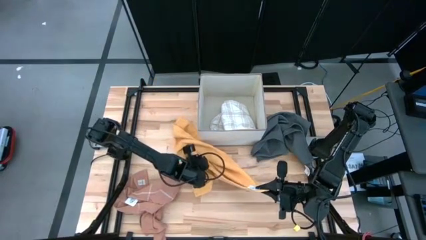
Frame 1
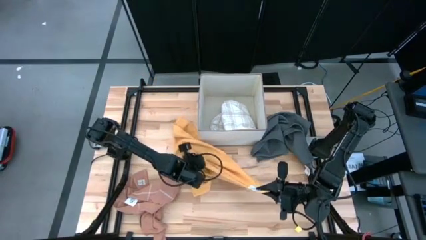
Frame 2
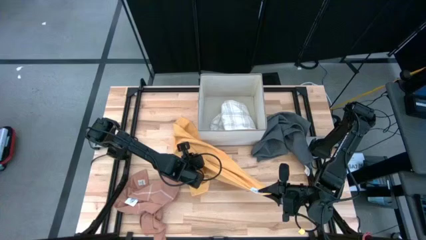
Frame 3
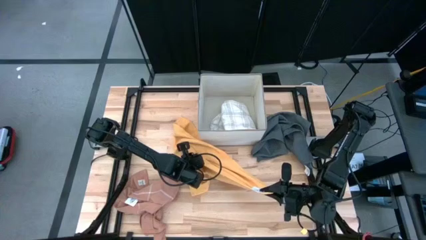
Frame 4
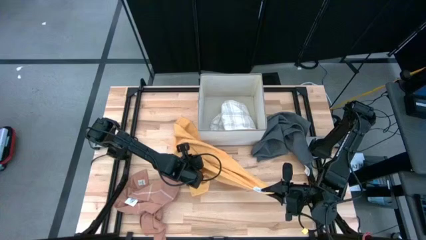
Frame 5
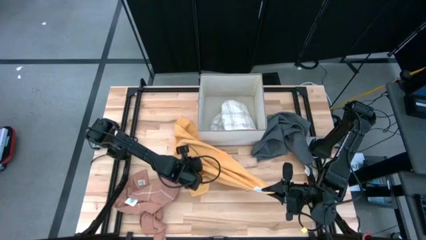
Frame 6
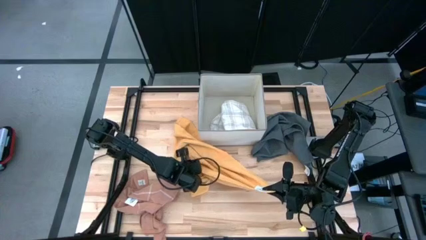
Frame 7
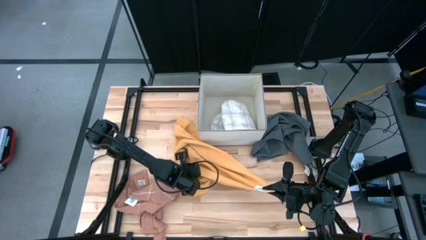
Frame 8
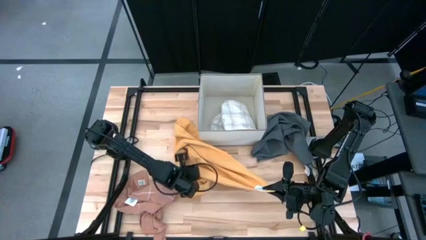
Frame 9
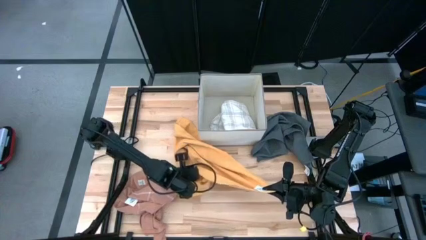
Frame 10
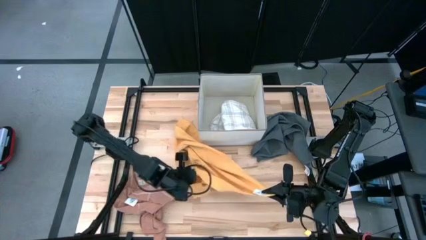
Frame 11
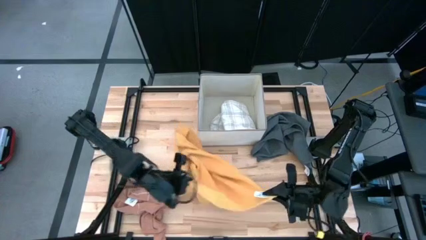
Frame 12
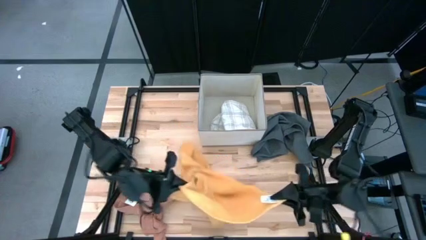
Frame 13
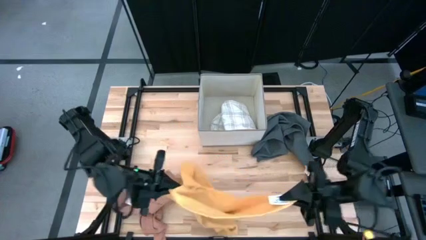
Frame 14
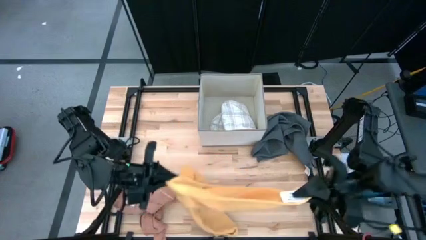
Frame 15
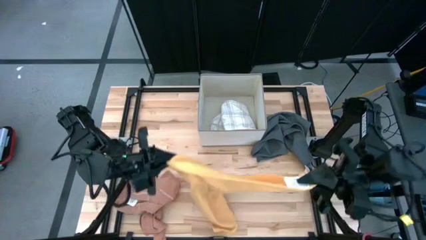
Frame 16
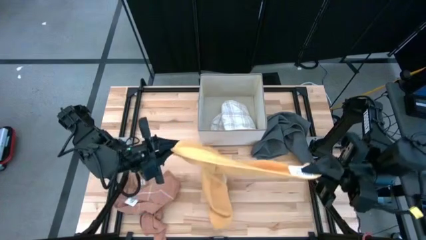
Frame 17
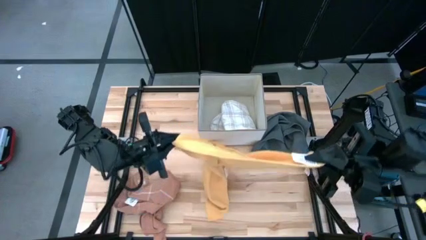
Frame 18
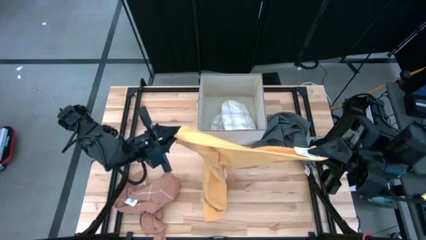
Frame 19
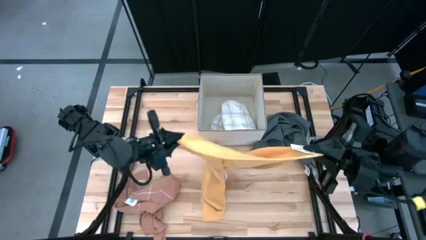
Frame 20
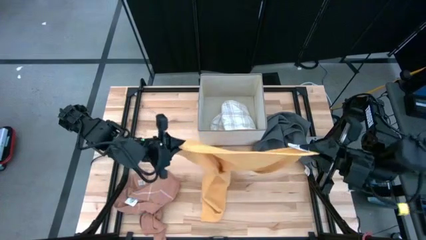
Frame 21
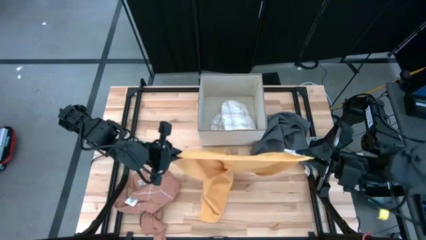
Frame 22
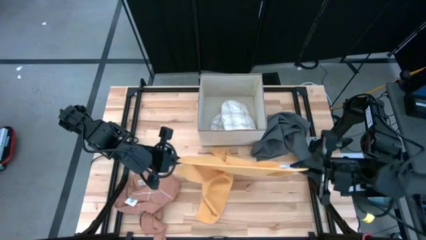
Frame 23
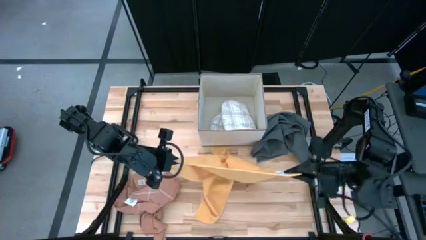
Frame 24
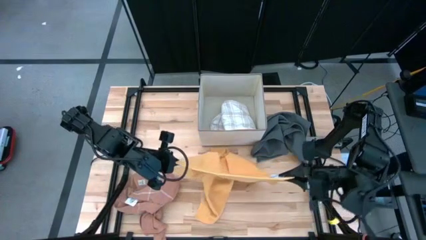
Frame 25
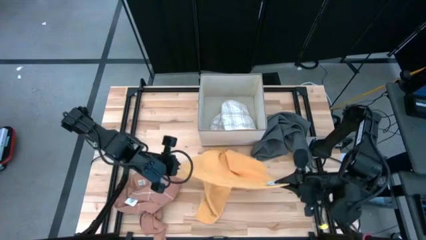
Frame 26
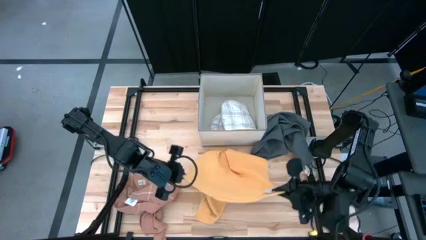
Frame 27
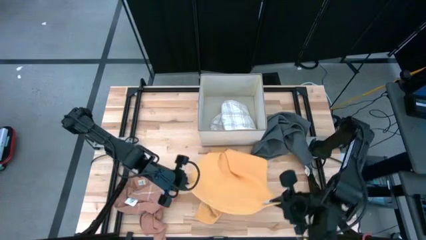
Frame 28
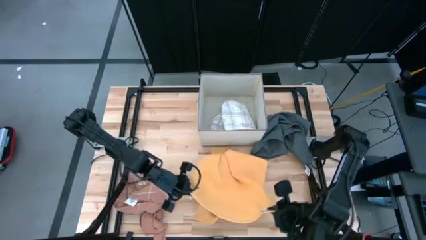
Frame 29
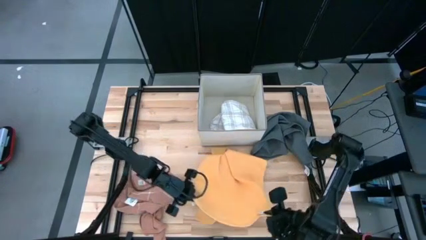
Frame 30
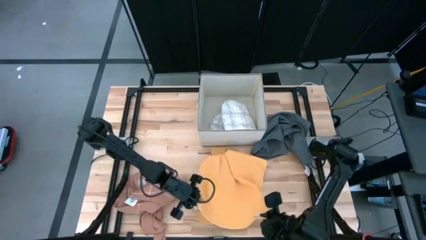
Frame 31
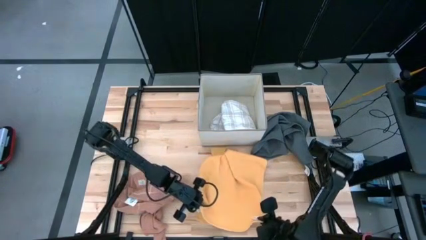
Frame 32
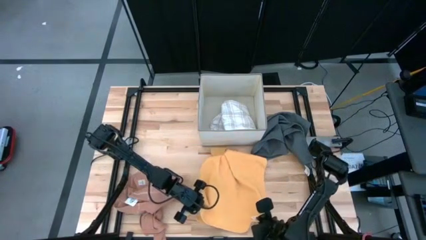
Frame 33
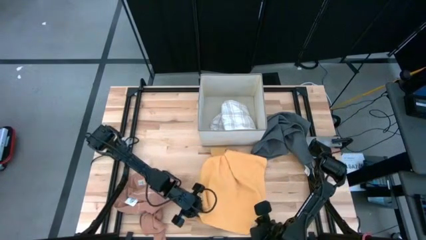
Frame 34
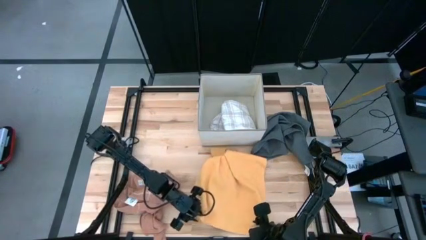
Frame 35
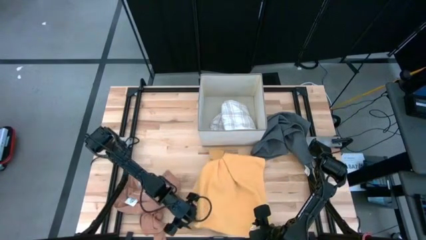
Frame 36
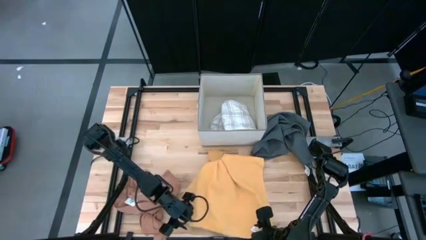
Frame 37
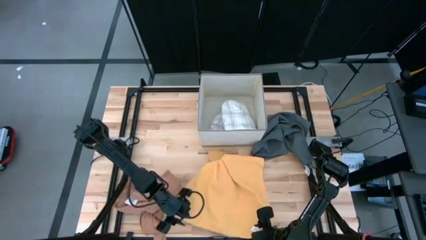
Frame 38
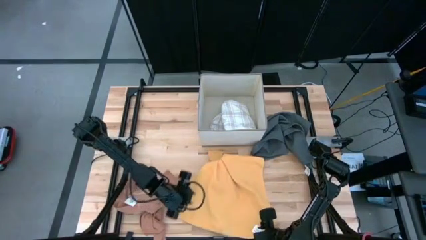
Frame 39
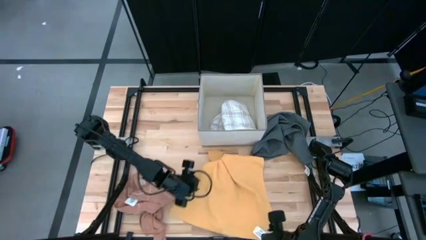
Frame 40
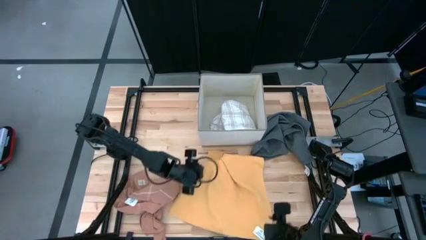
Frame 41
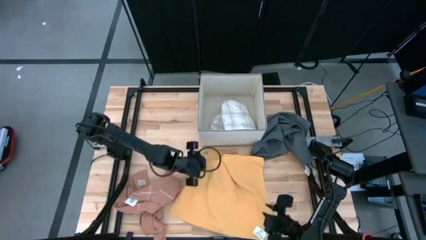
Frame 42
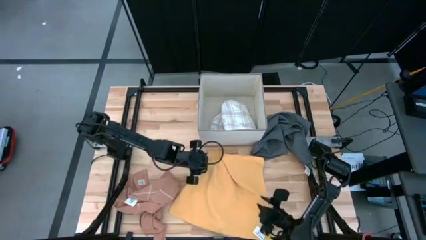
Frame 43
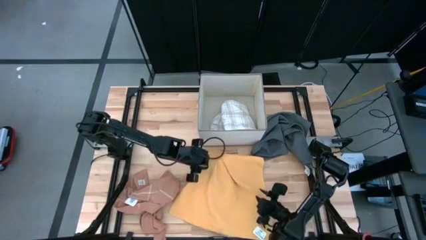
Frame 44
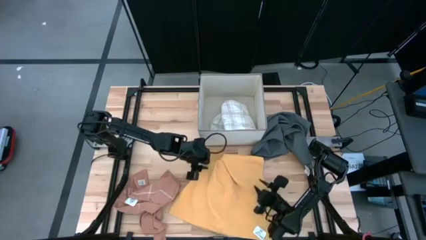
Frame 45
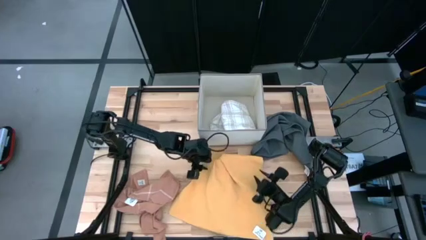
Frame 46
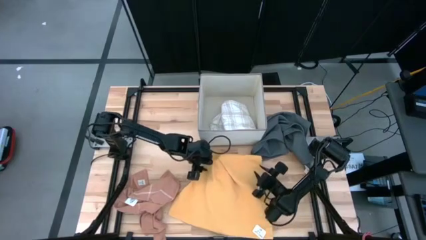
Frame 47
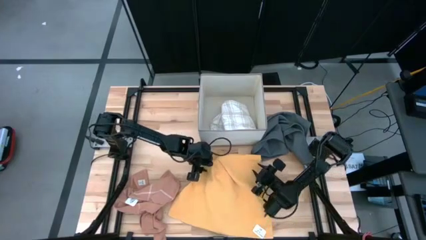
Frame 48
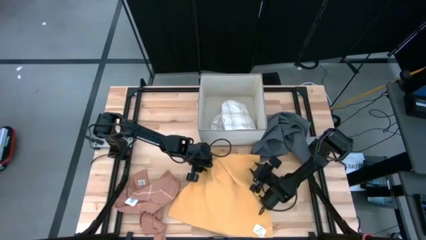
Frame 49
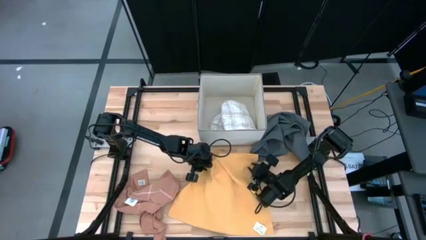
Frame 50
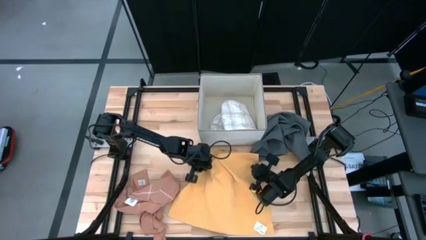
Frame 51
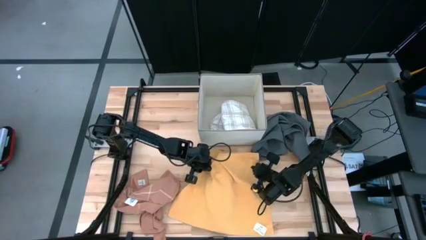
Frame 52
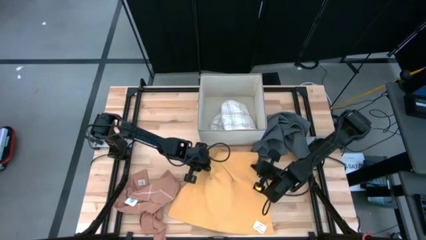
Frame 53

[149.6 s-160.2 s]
Task: Fold towel
Fold the yellow towel

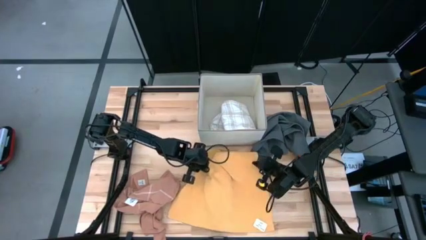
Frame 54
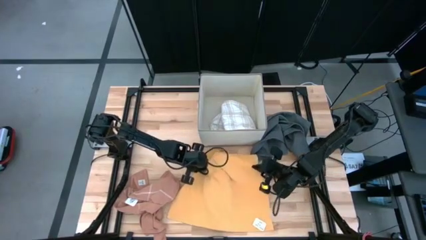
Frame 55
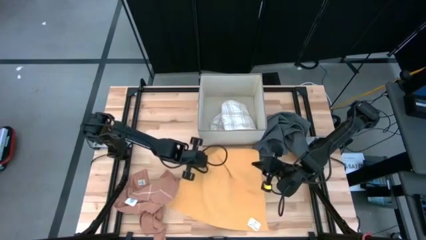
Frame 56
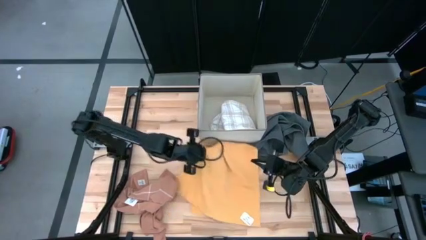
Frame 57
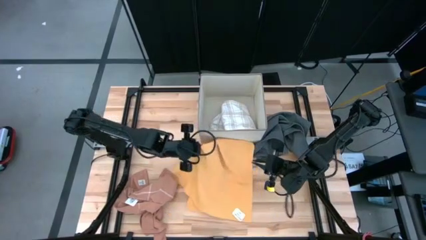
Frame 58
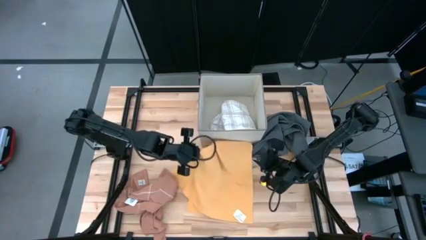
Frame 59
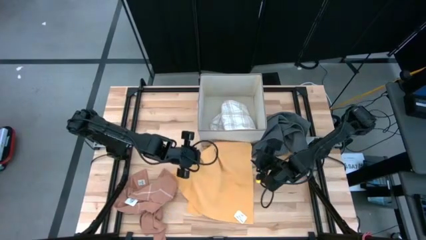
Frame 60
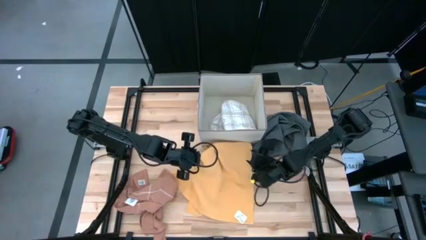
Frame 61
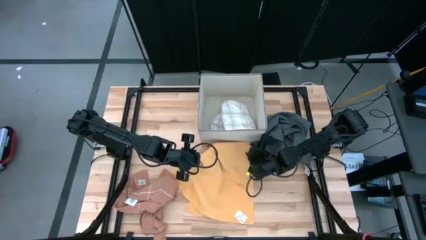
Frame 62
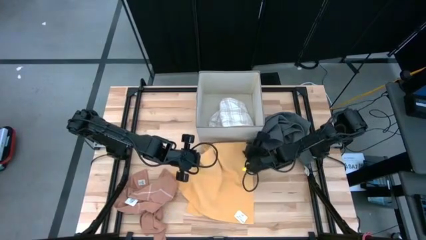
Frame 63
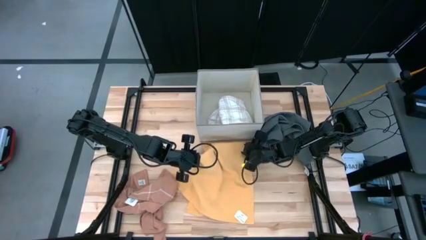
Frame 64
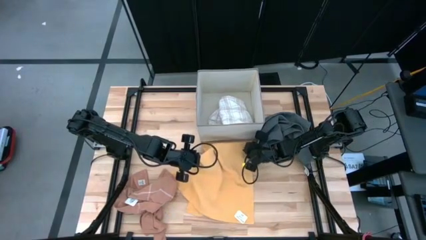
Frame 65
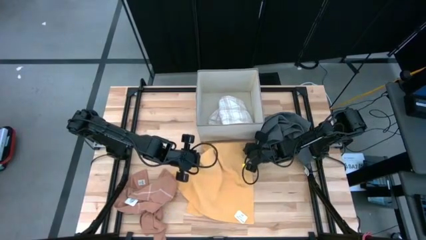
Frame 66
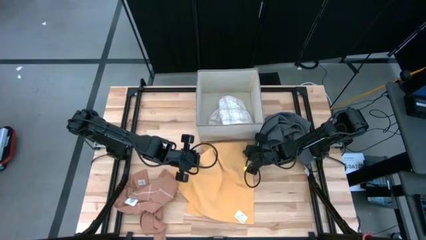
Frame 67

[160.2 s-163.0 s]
Fold the yellow towel
